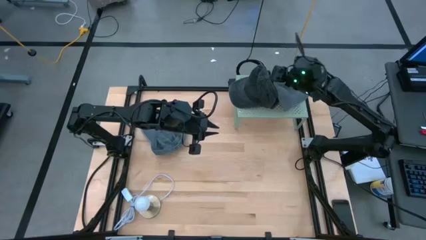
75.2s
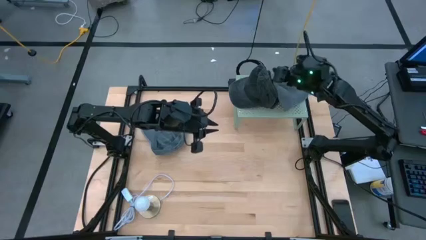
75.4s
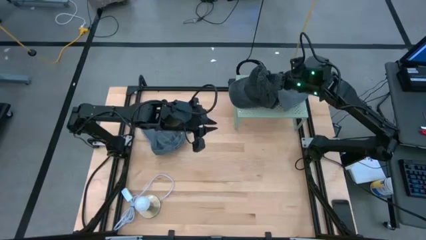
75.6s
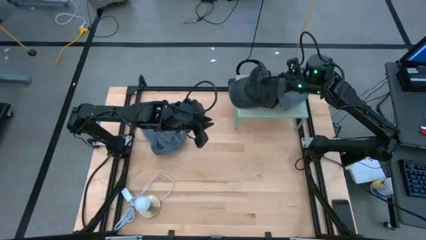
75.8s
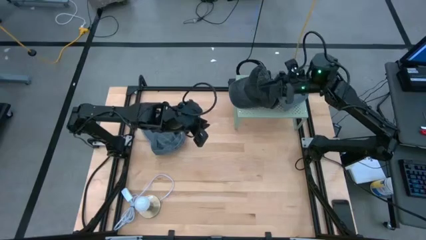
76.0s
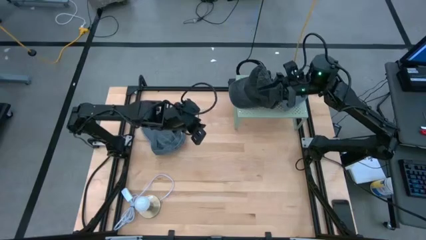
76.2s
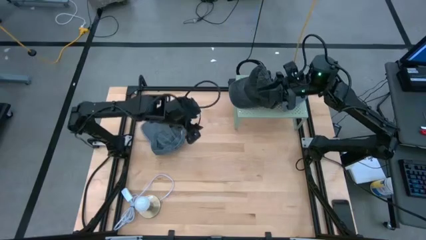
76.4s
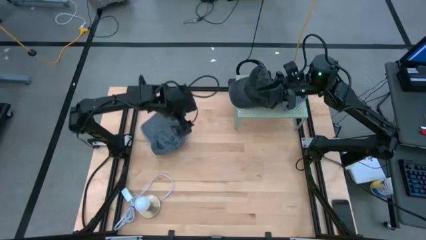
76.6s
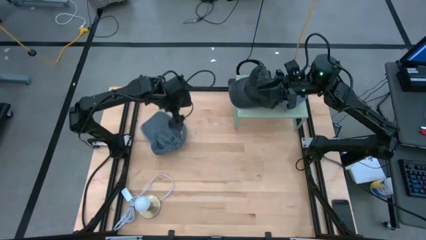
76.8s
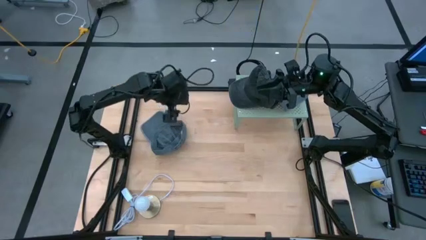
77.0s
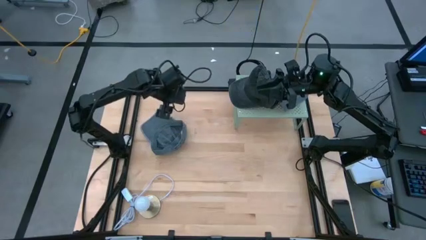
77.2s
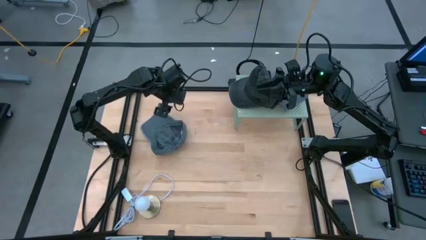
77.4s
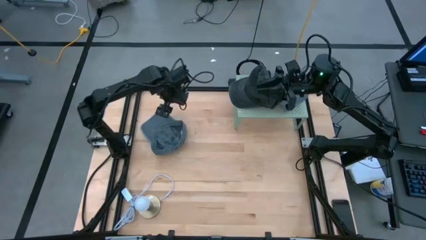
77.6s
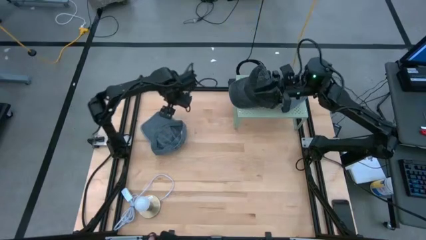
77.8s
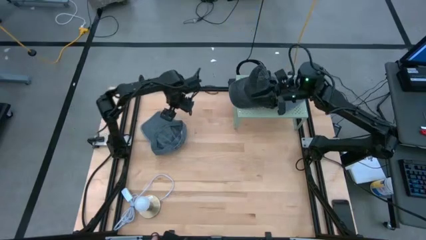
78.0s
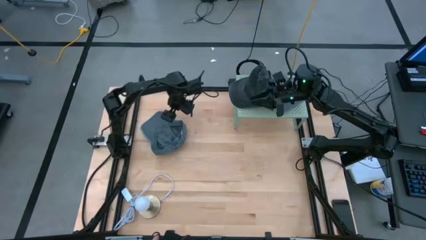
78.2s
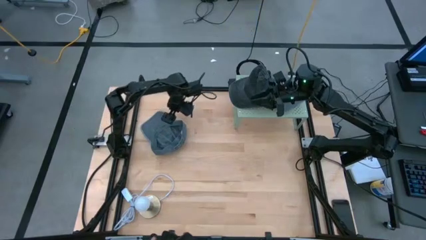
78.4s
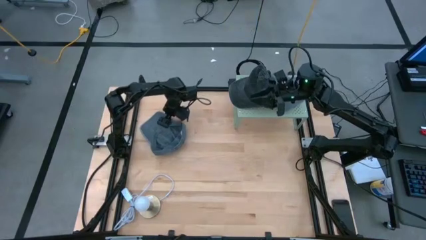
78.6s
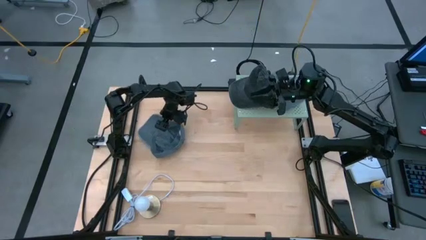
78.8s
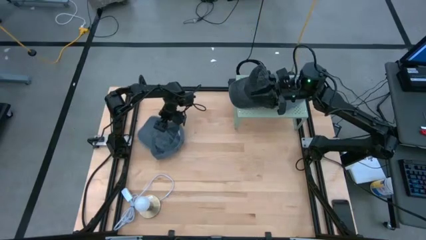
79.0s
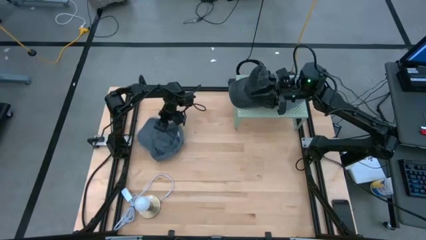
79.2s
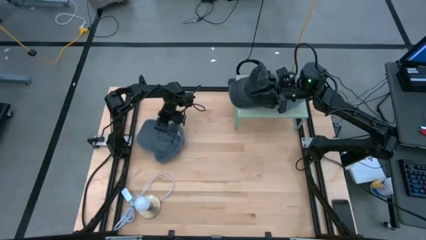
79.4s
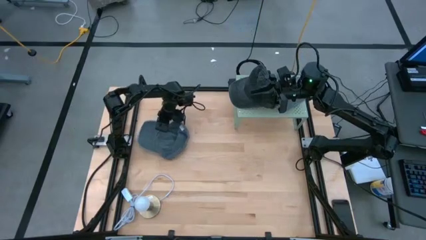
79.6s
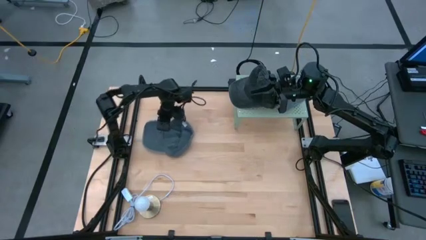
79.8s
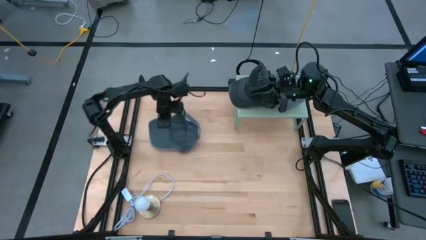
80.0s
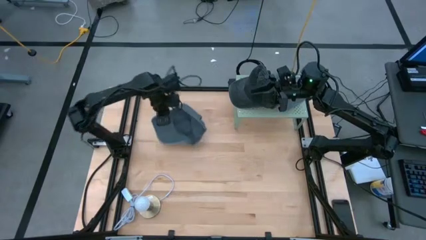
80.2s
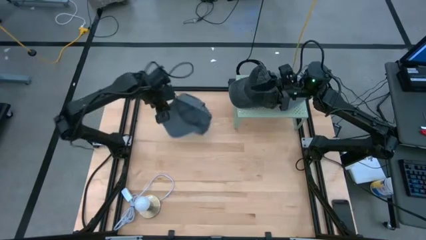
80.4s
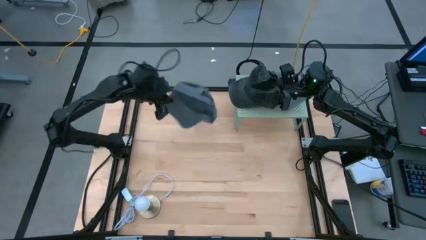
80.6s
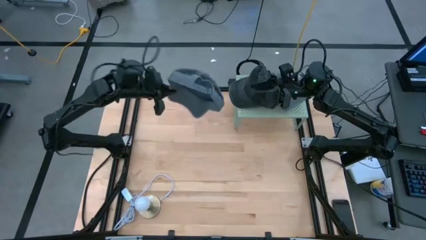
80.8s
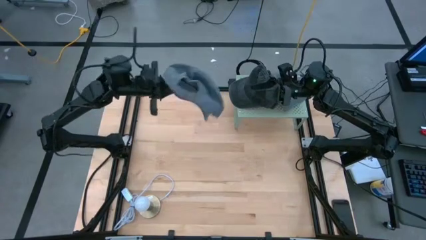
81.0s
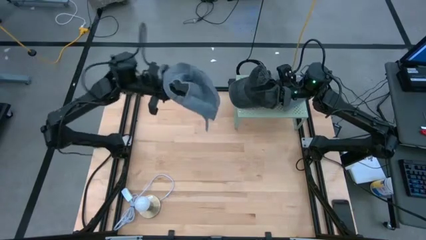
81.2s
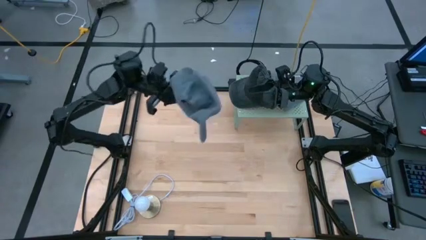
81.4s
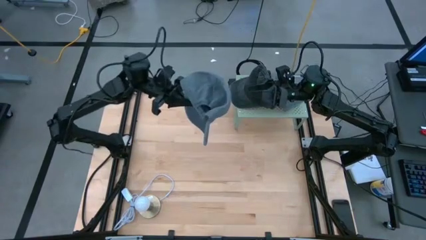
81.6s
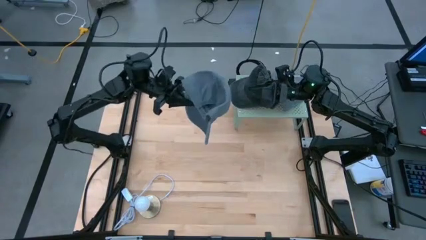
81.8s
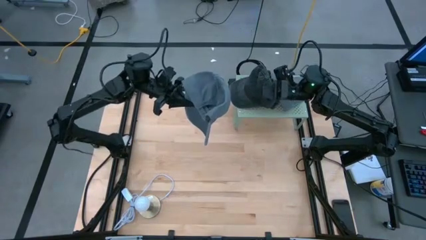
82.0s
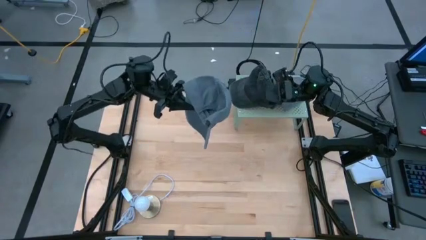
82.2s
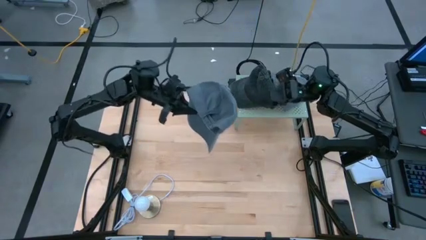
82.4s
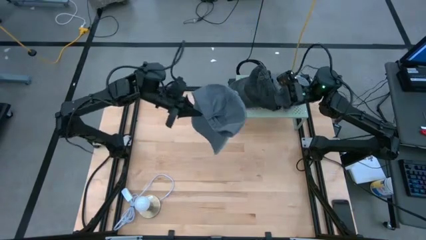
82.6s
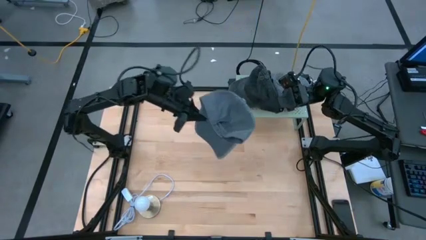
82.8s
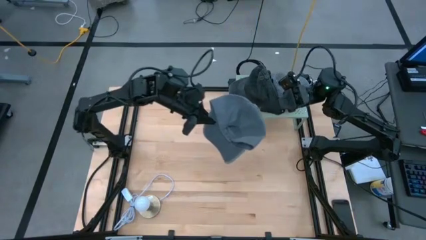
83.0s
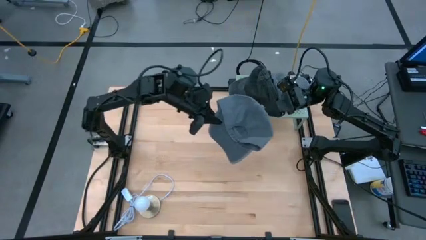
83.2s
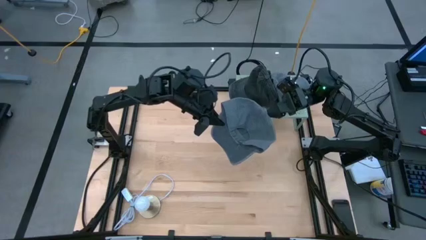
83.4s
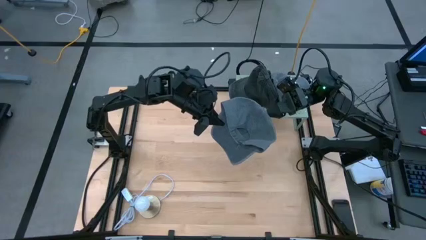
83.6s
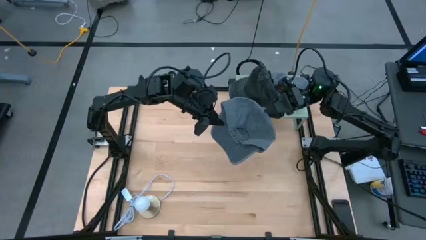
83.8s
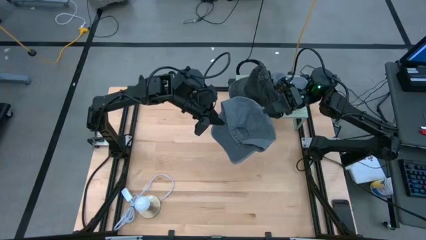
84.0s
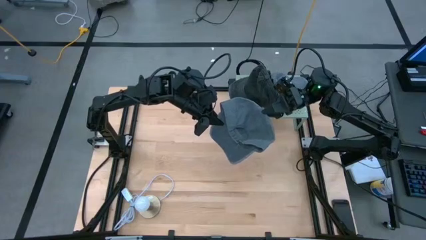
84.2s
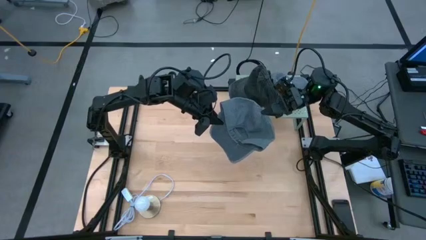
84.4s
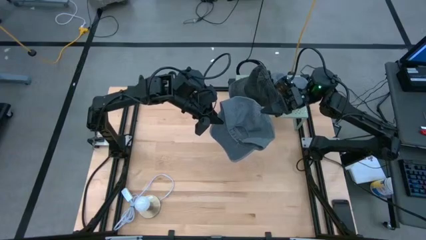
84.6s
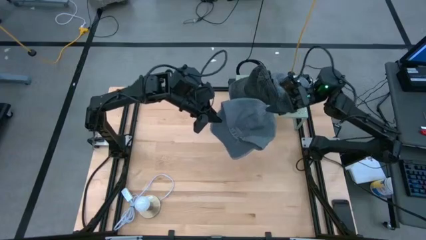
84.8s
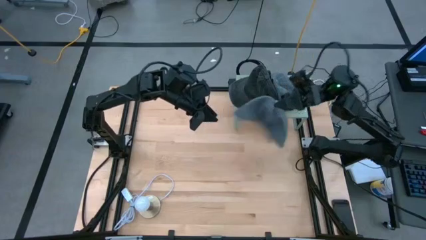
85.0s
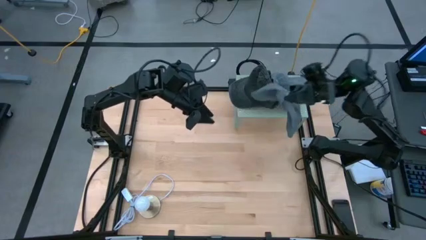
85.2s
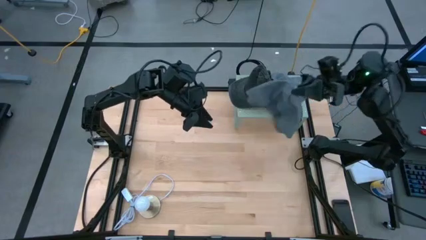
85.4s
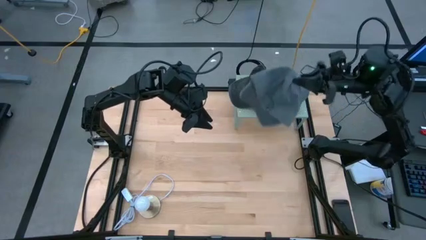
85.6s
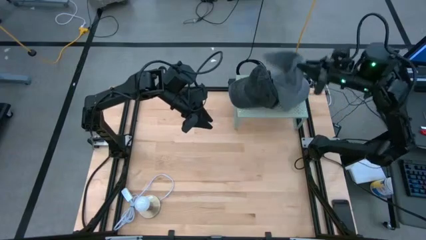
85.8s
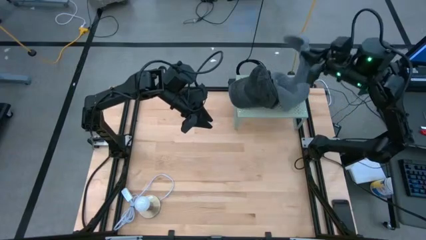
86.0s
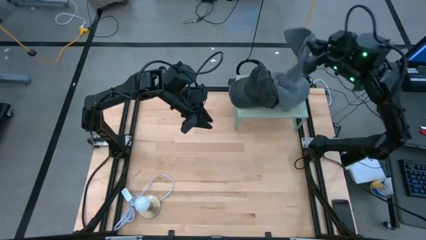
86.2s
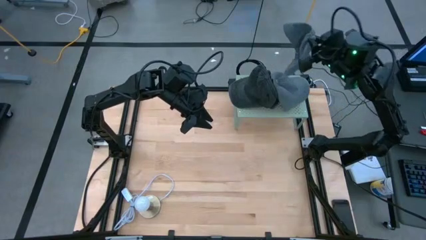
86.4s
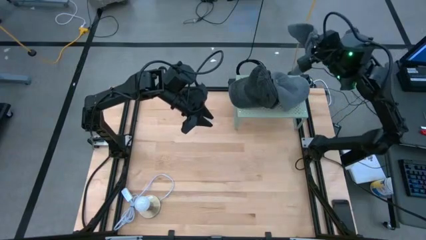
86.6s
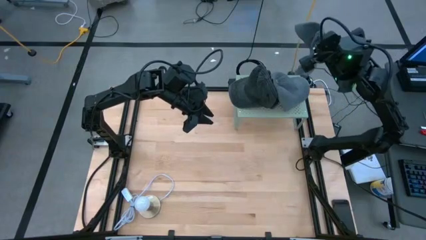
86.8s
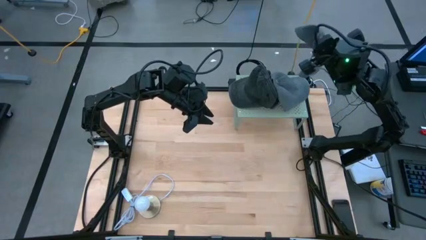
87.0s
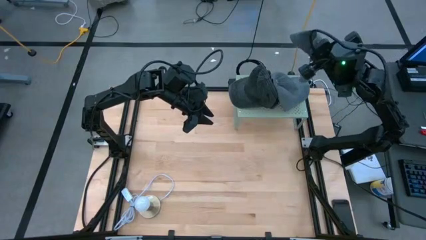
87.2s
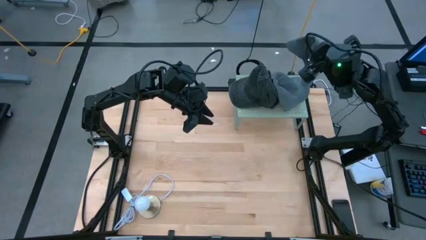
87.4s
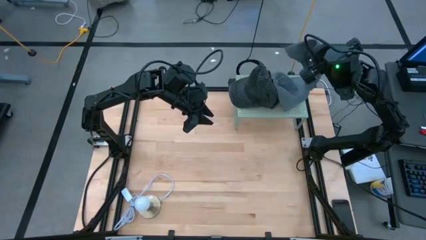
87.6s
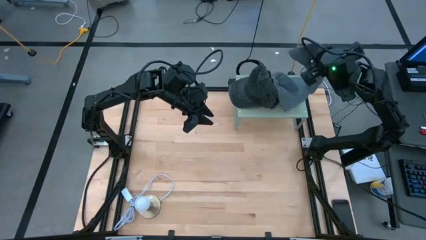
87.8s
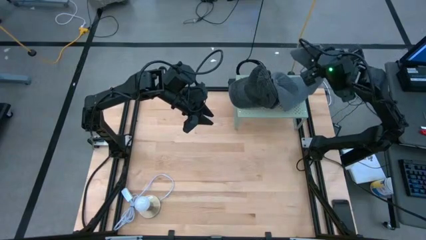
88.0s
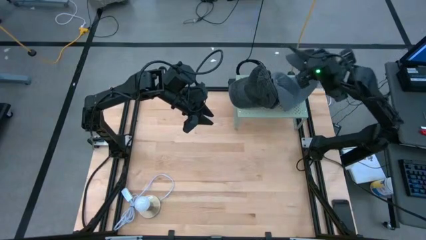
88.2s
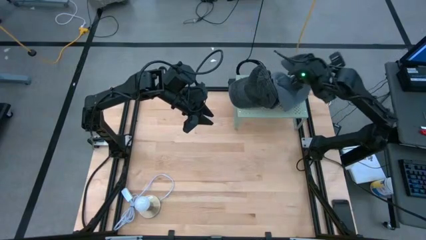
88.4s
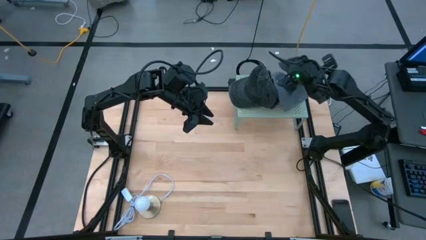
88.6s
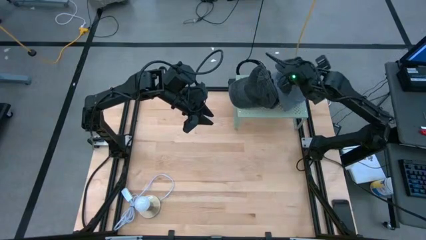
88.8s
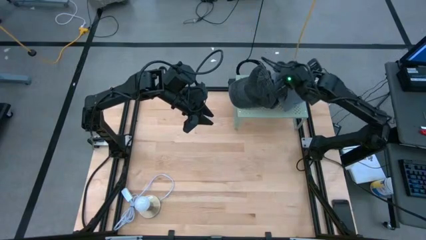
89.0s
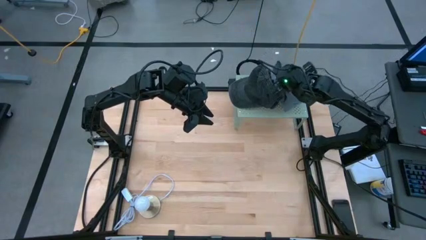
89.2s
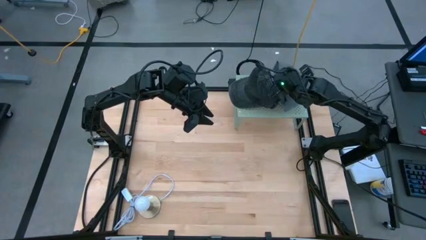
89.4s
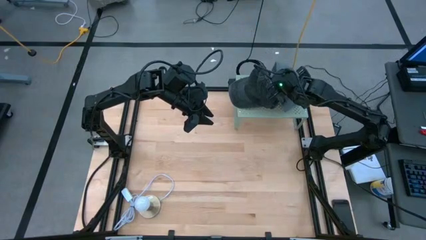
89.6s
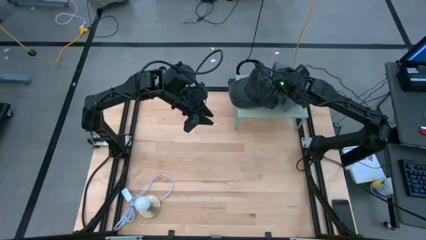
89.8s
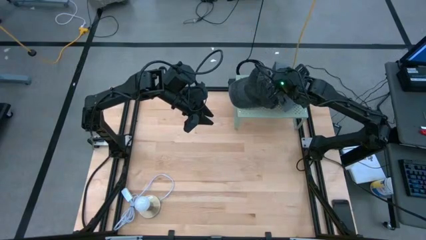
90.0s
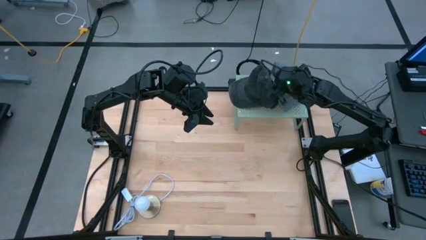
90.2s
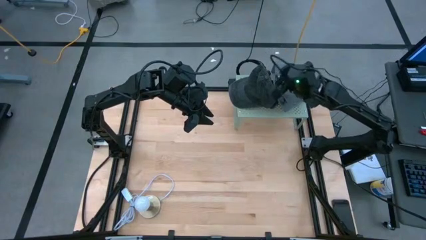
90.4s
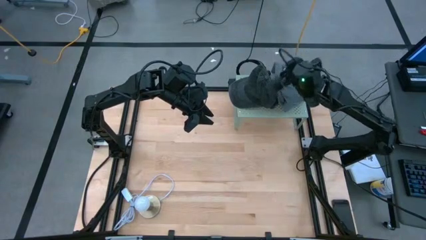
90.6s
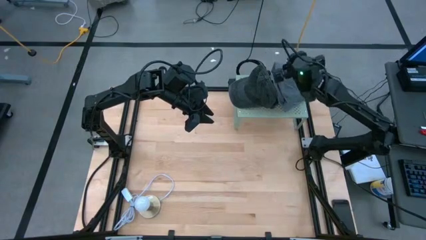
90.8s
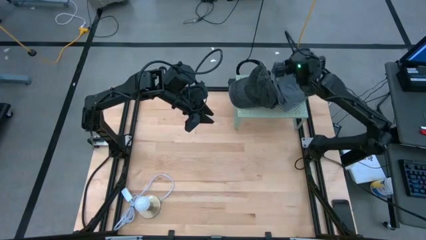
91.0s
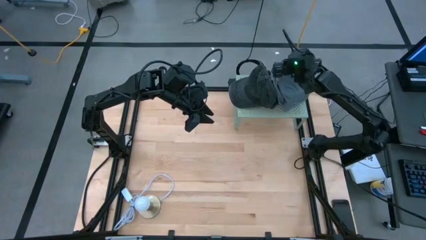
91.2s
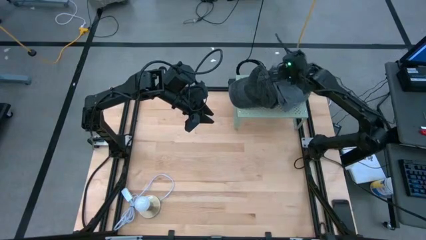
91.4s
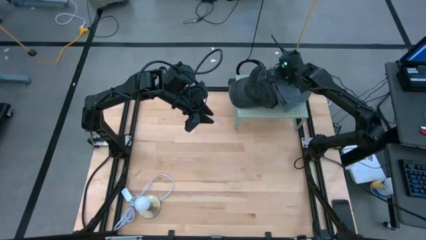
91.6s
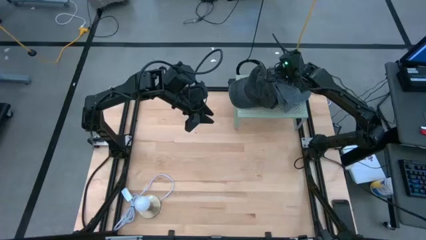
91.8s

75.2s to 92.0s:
Task: Pick & Place hat
Stack the gray cap on the gray cap on the shelf
